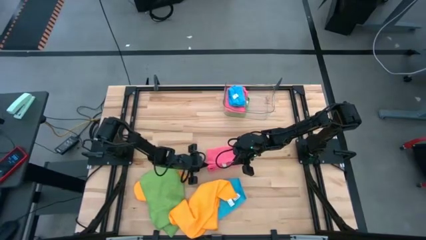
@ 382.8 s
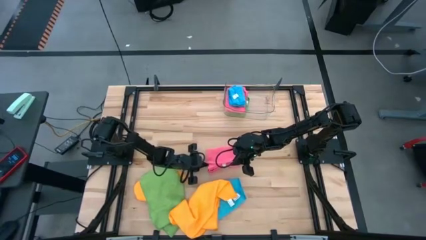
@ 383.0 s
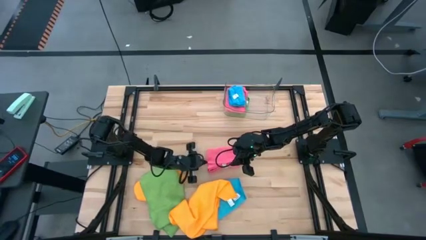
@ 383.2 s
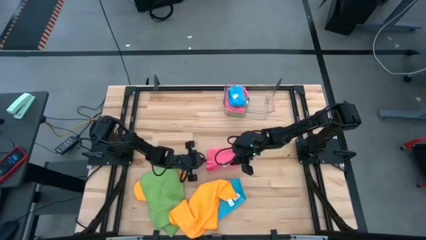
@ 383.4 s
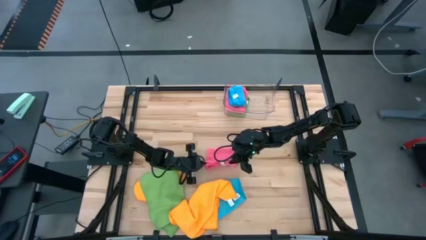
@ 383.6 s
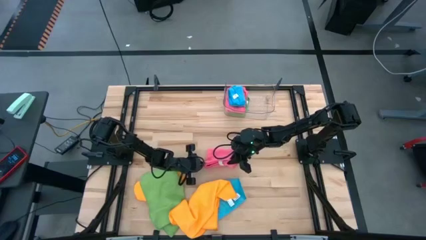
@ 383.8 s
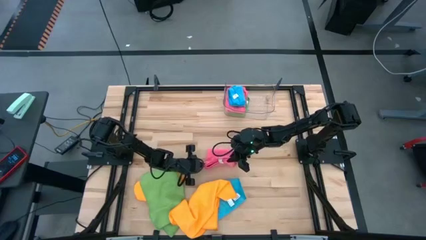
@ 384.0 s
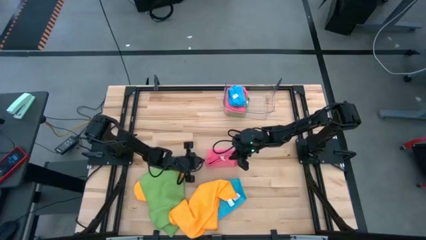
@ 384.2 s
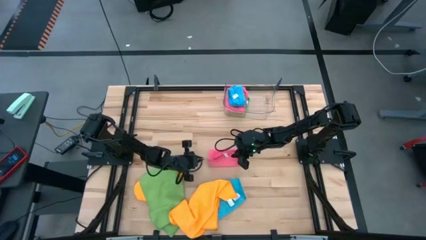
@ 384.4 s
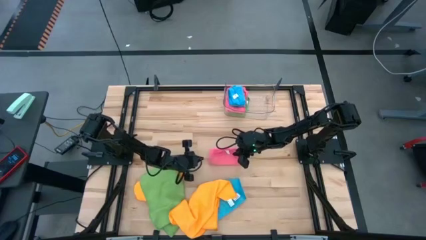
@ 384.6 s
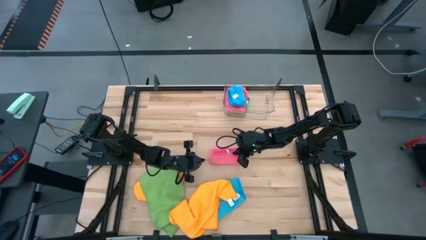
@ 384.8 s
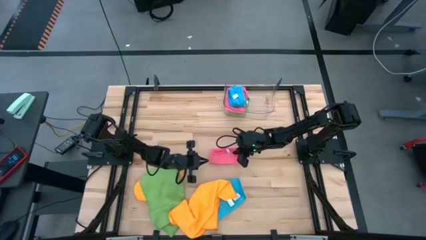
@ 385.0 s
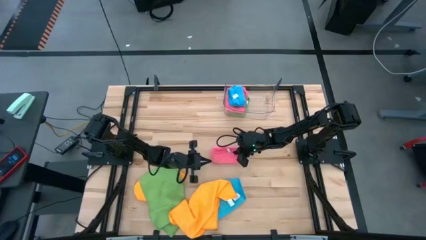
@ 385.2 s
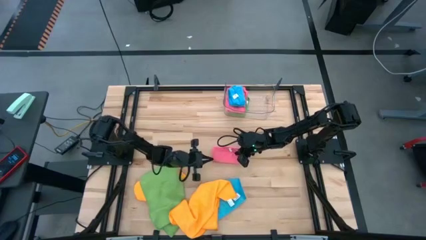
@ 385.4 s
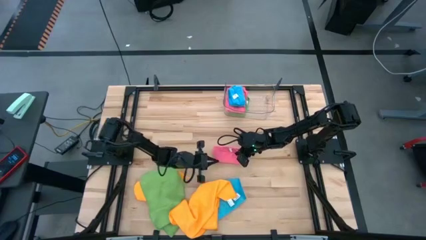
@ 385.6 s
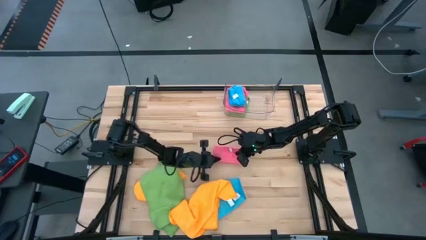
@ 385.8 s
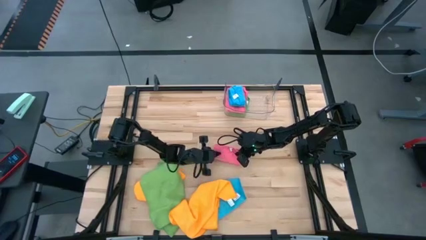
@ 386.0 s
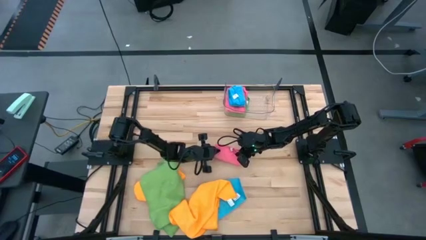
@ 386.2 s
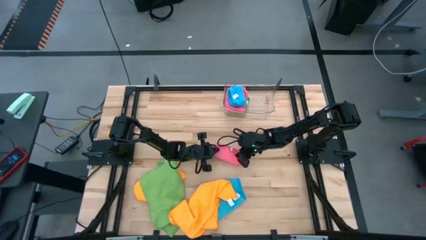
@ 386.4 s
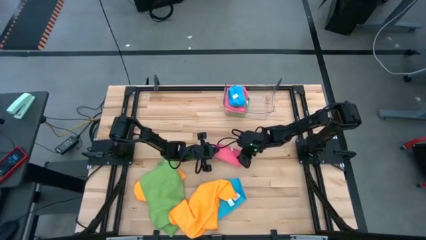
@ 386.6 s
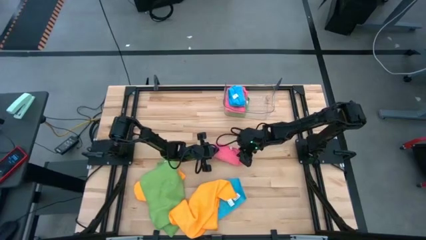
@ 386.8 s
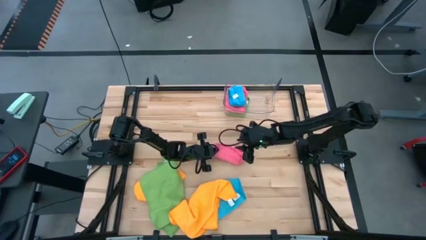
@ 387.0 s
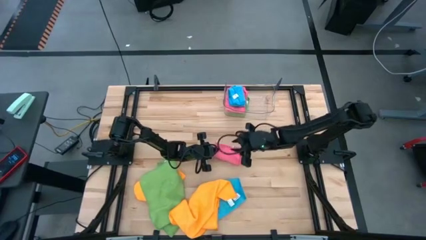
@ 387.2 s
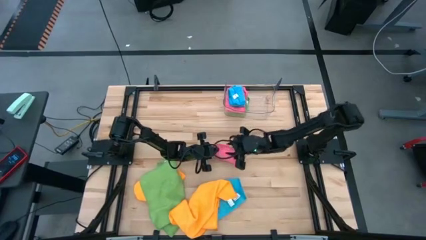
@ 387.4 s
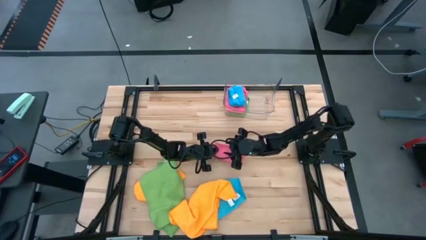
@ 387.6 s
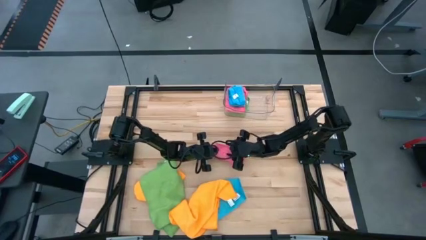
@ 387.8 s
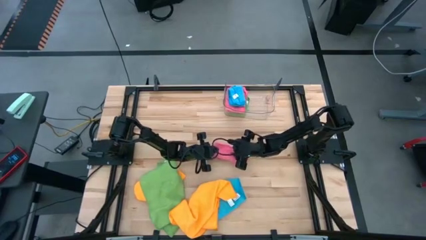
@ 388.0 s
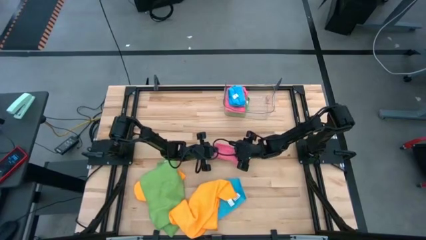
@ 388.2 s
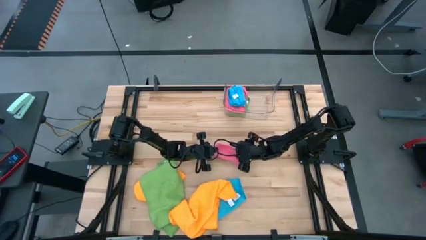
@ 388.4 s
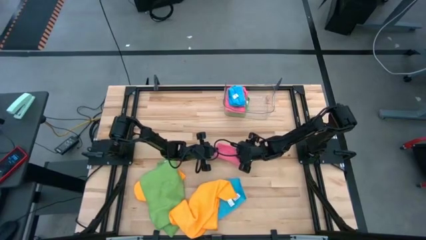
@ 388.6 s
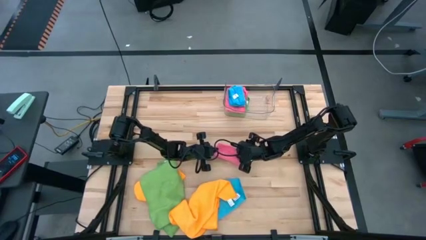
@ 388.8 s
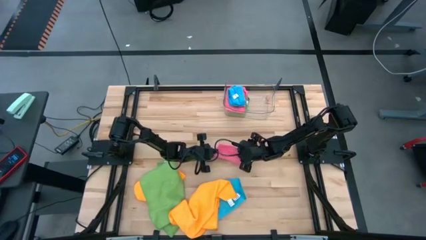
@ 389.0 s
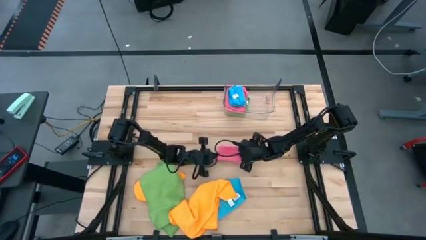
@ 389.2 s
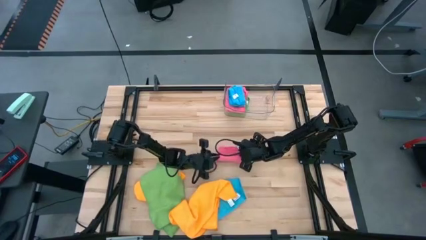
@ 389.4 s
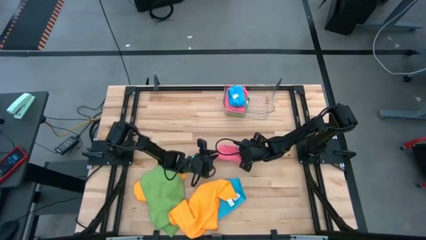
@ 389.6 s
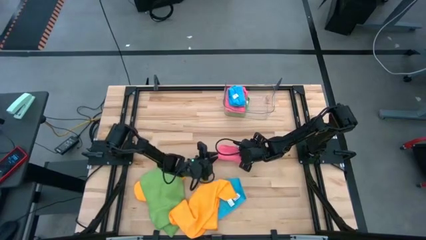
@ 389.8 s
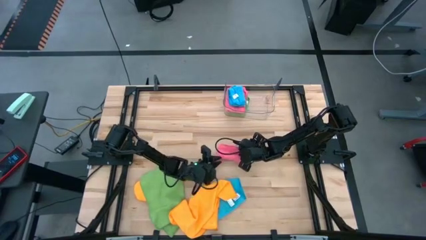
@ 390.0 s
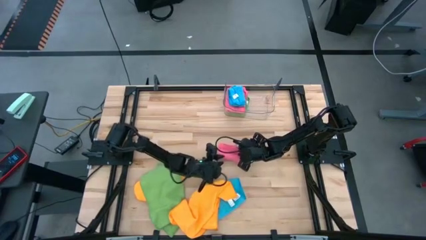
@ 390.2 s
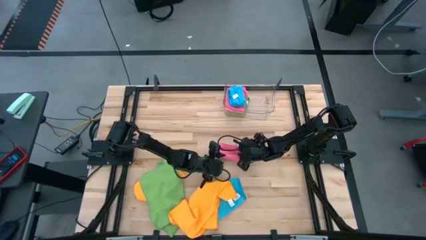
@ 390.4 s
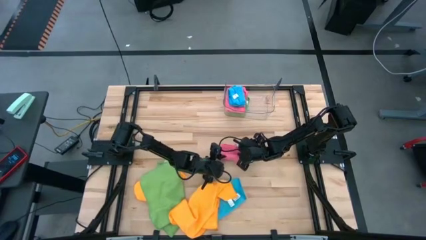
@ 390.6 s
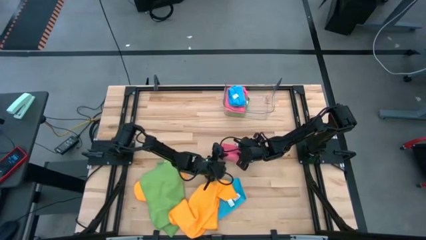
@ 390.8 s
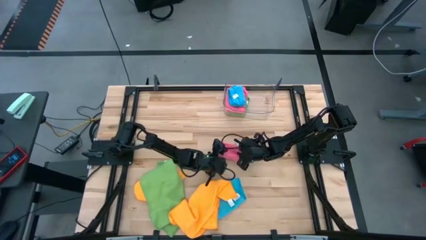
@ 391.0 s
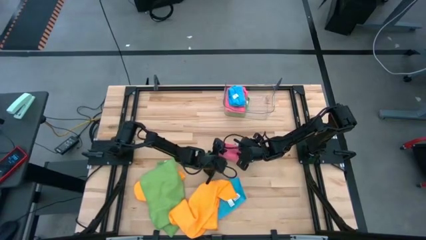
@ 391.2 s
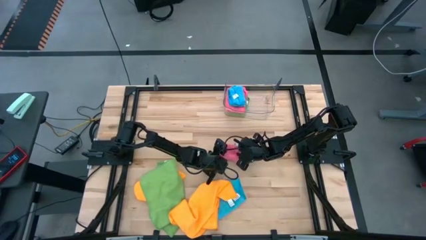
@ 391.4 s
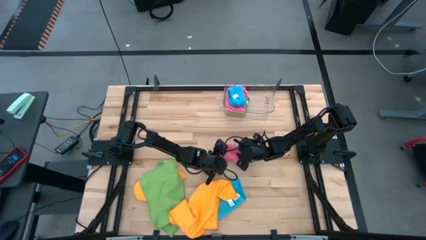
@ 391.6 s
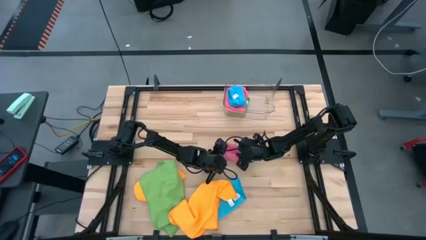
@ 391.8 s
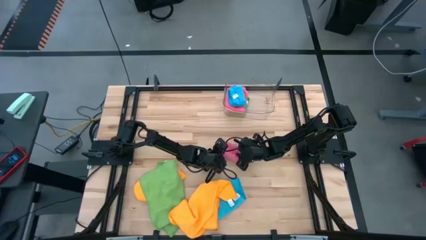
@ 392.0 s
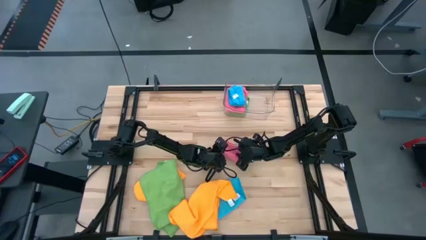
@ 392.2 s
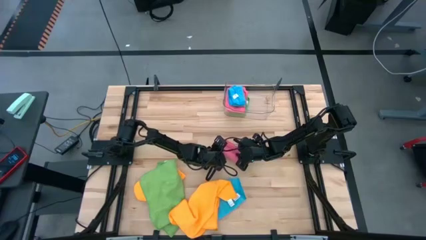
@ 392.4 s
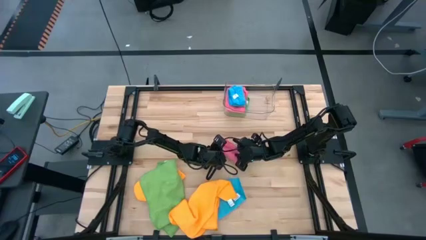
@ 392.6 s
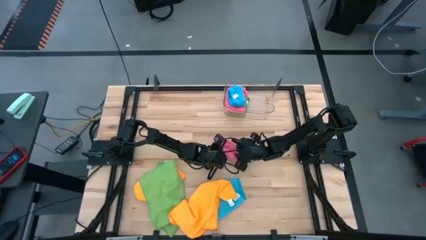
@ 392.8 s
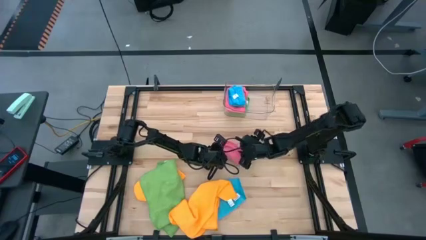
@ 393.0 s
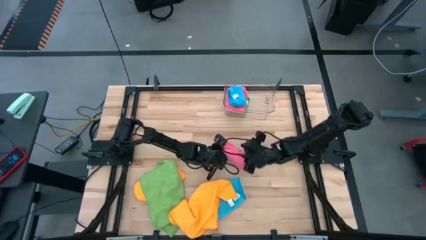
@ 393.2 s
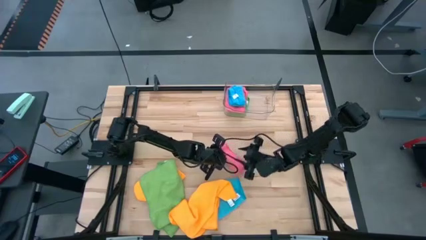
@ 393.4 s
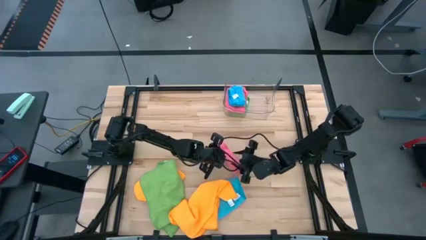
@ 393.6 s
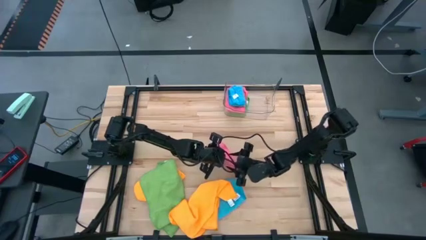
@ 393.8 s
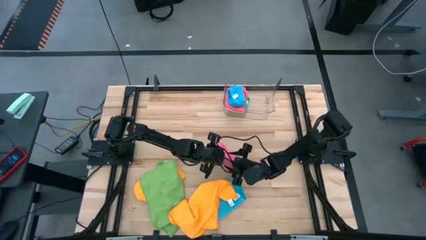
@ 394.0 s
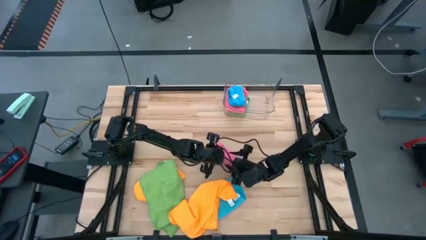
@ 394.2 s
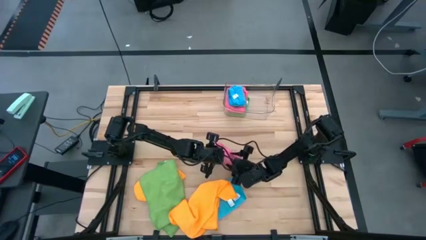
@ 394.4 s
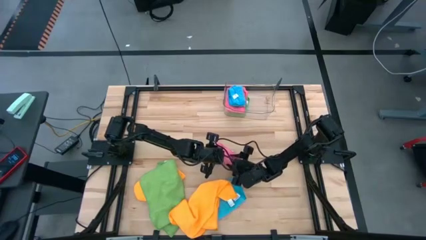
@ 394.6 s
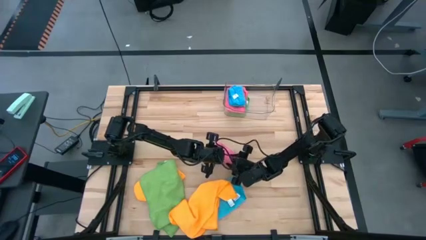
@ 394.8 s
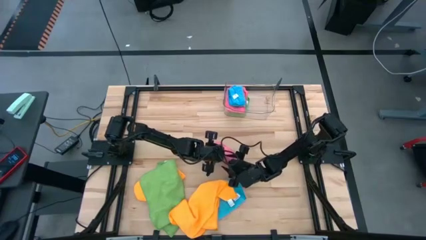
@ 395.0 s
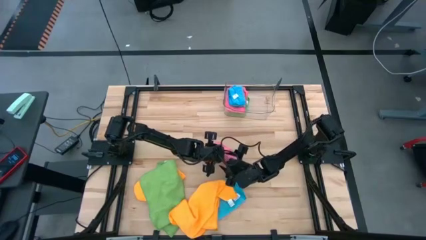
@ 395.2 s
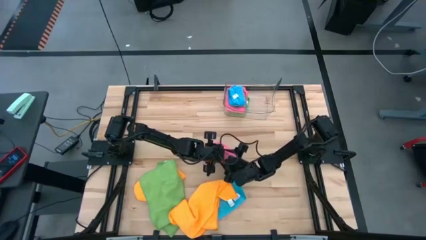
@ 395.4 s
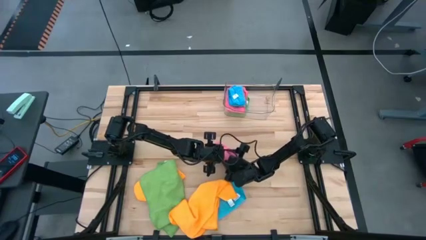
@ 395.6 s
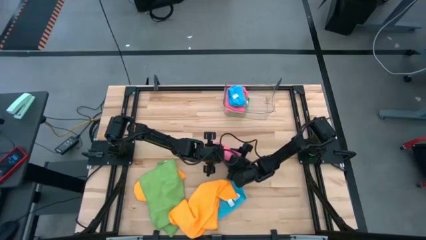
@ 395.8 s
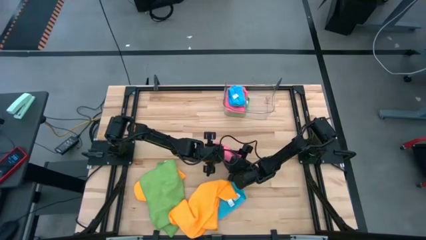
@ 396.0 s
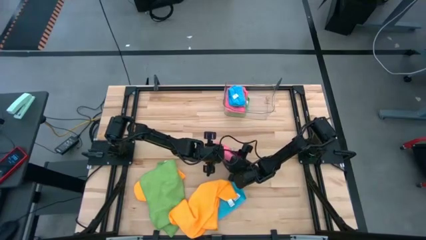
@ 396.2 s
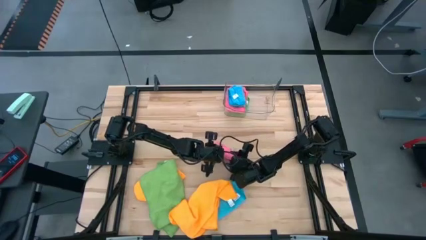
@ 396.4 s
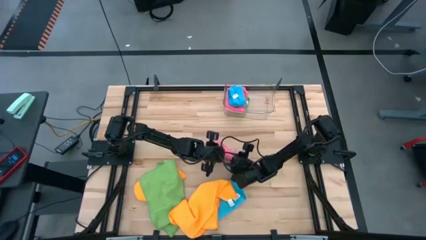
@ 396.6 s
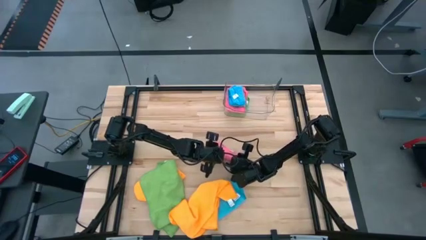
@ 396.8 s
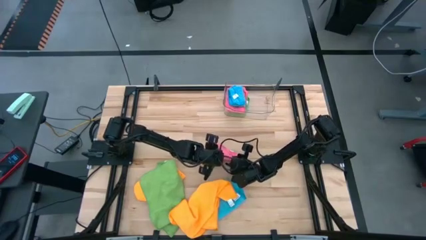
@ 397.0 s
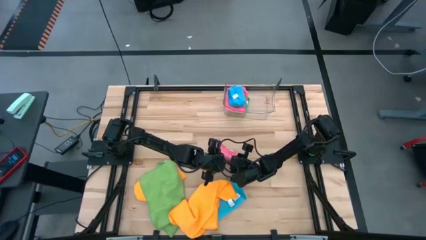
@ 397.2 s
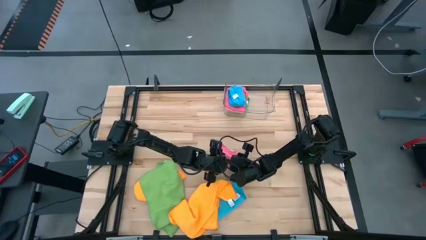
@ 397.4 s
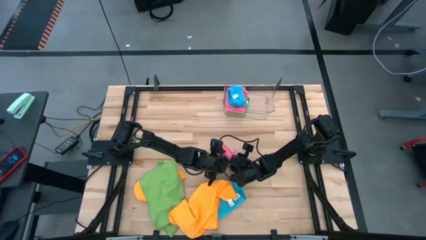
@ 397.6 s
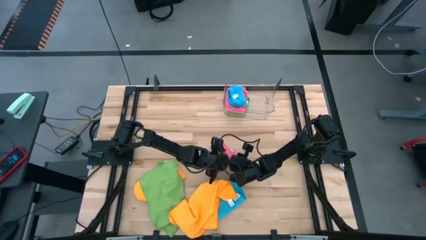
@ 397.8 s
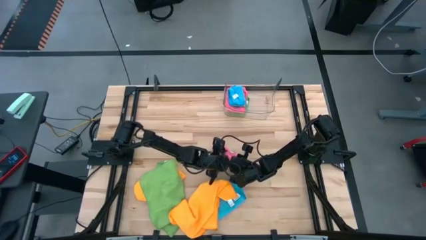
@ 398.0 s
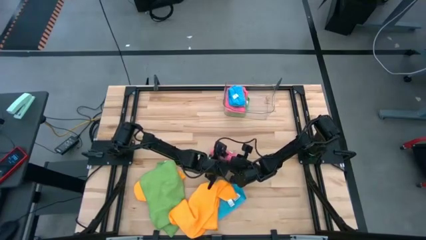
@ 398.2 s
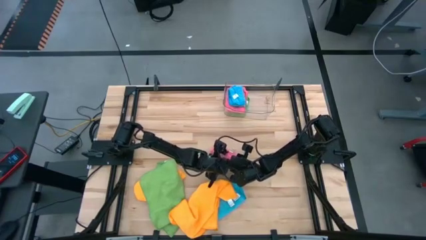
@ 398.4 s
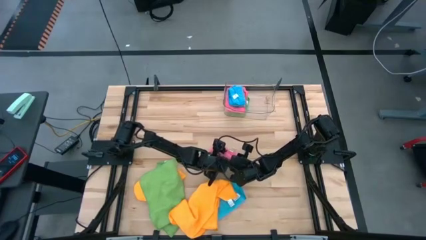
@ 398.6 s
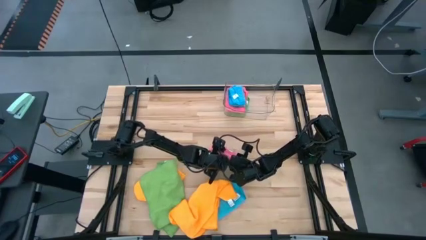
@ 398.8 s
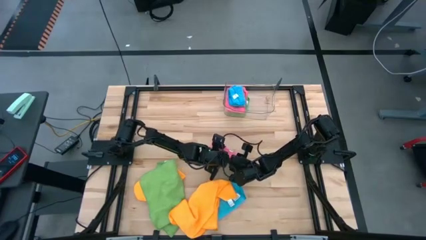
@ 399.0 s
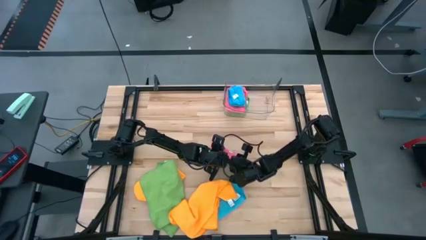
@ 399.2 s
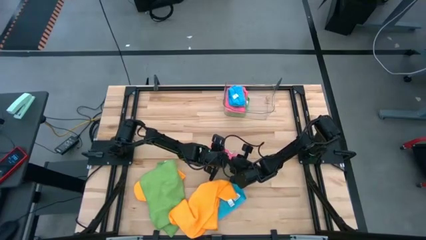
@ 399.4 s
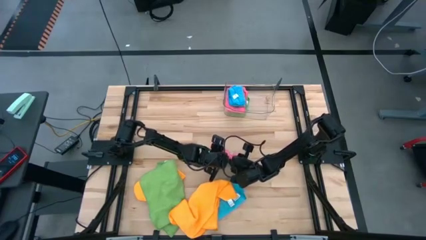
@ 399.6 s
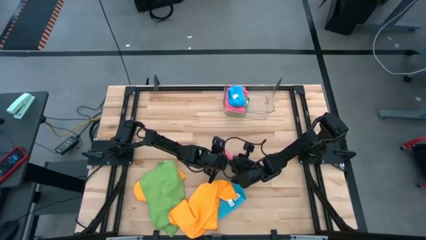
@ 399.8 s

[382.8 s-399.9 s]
Task: Fold microfiber towels
Fold the pink towel
